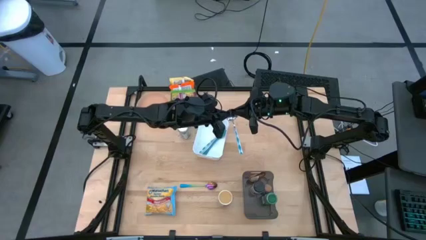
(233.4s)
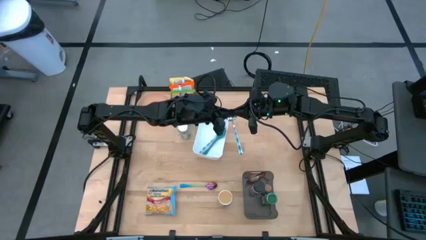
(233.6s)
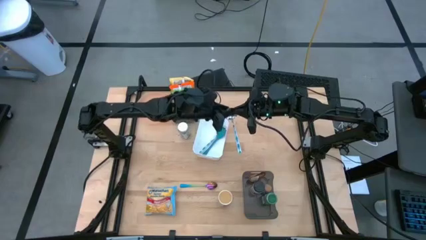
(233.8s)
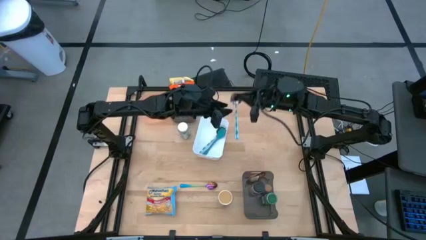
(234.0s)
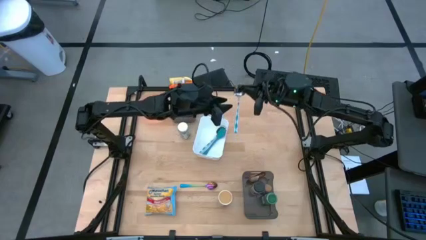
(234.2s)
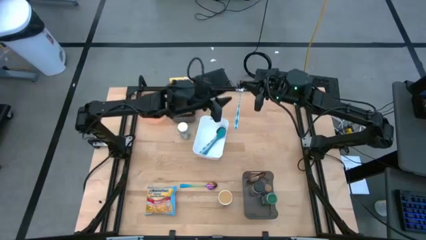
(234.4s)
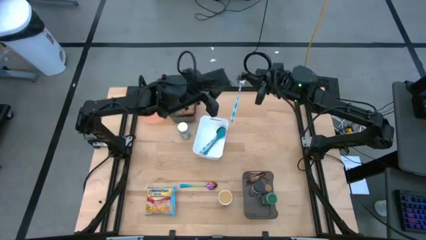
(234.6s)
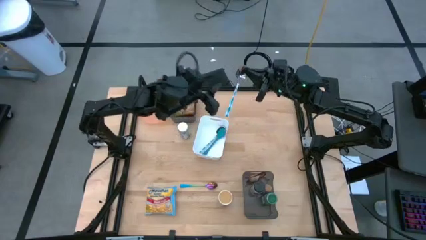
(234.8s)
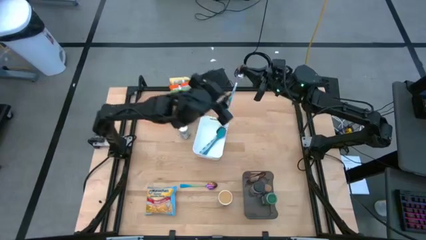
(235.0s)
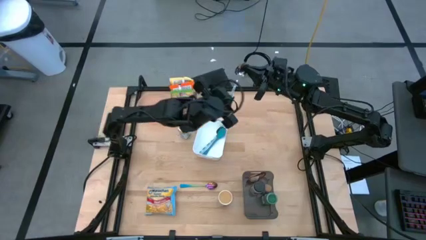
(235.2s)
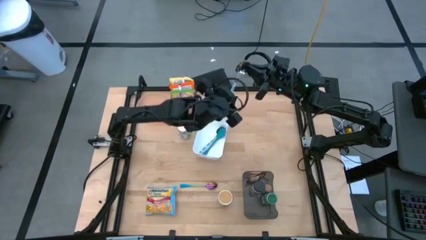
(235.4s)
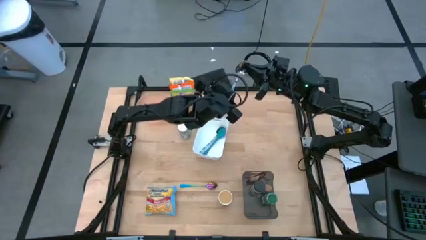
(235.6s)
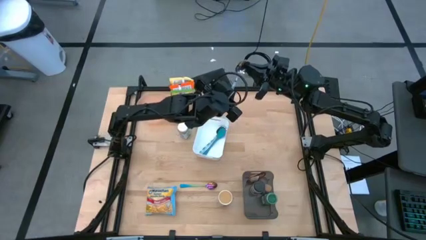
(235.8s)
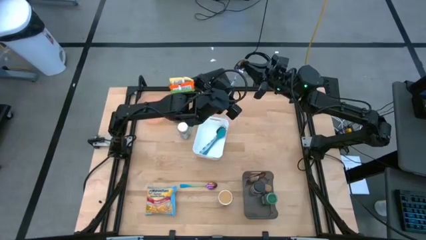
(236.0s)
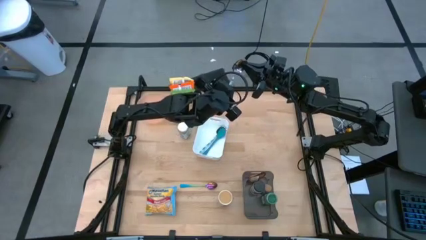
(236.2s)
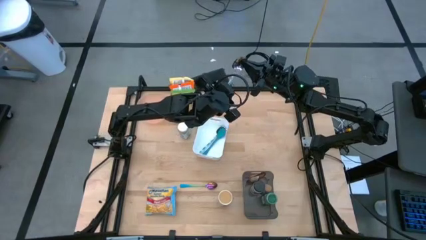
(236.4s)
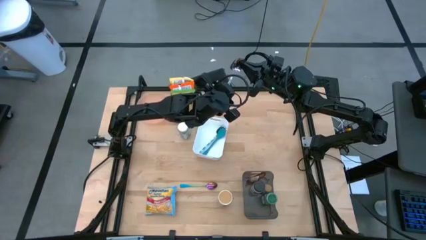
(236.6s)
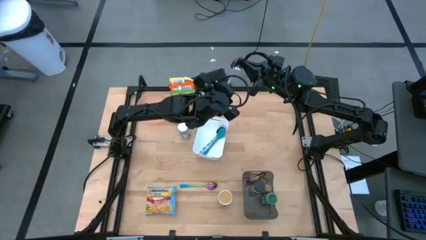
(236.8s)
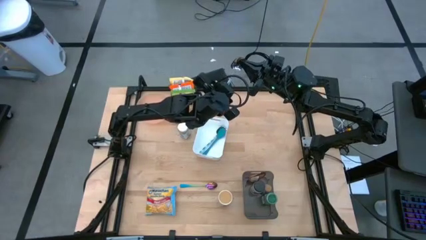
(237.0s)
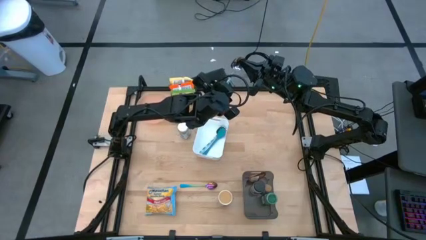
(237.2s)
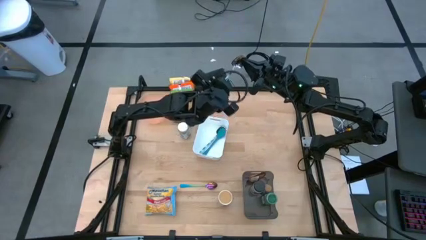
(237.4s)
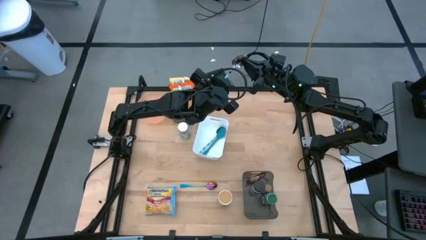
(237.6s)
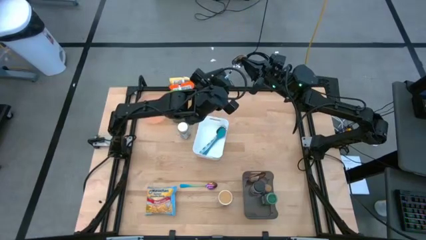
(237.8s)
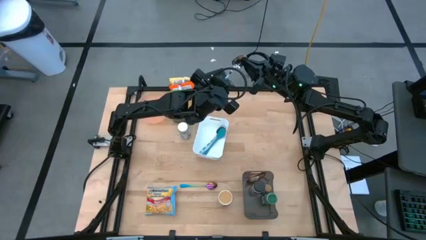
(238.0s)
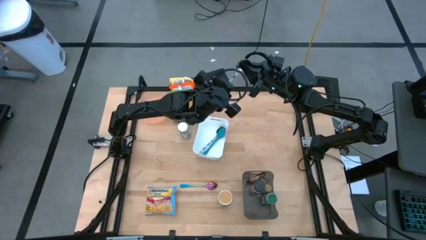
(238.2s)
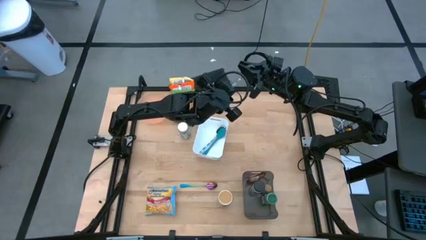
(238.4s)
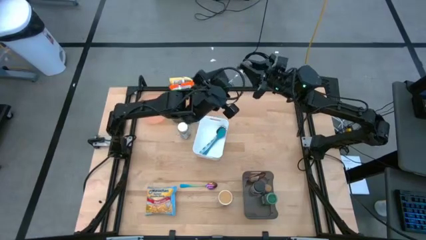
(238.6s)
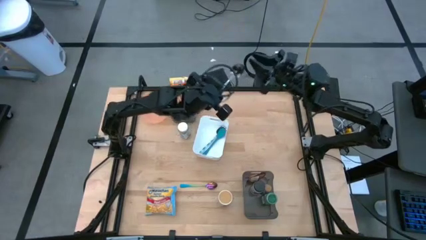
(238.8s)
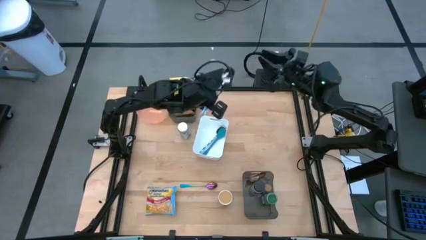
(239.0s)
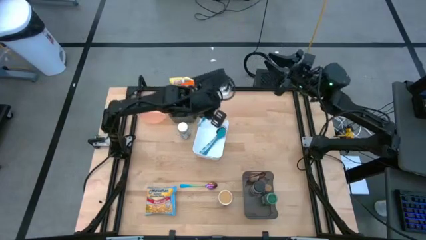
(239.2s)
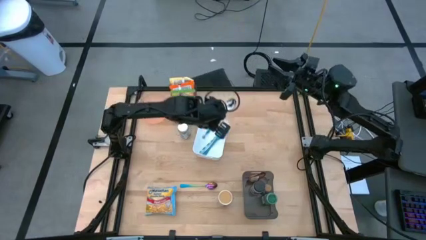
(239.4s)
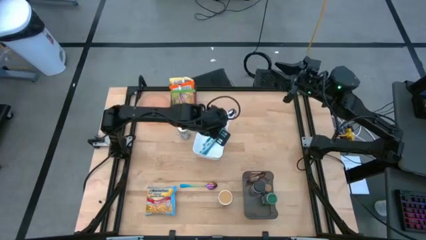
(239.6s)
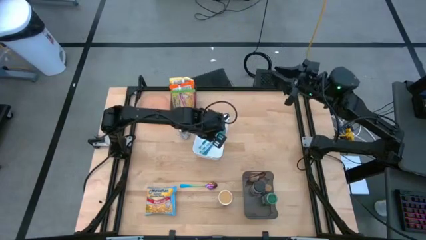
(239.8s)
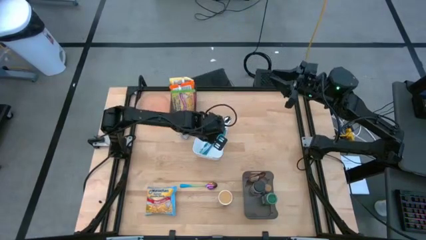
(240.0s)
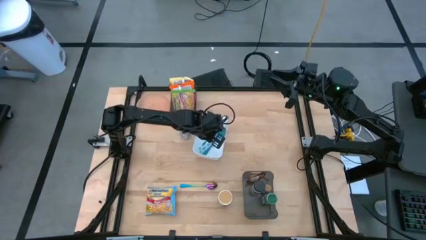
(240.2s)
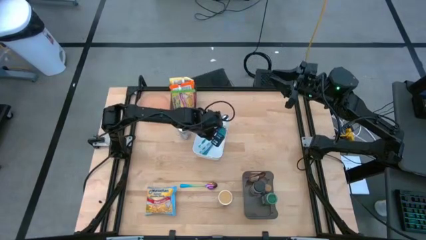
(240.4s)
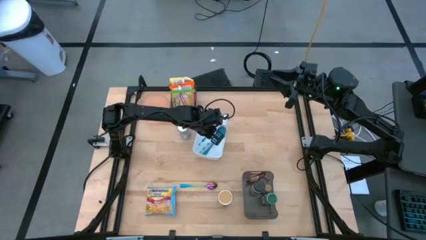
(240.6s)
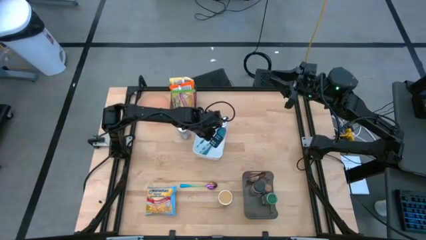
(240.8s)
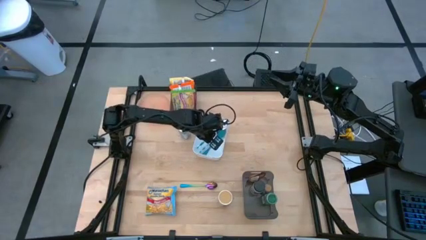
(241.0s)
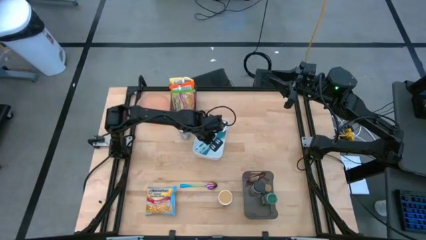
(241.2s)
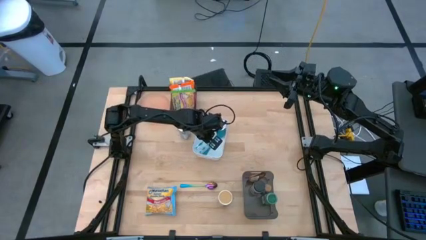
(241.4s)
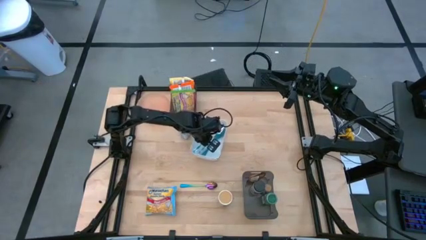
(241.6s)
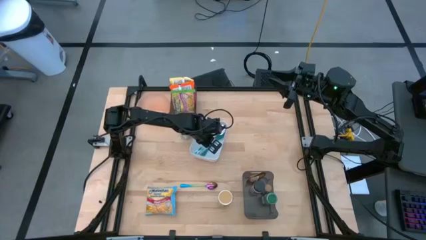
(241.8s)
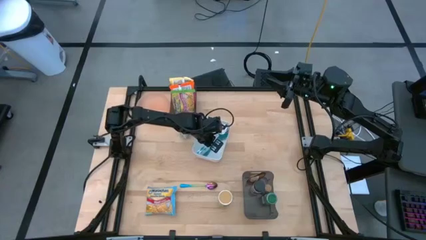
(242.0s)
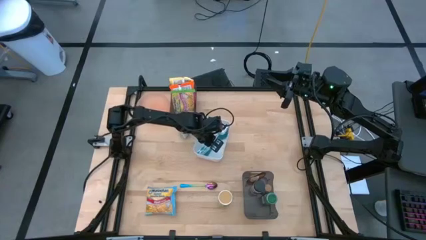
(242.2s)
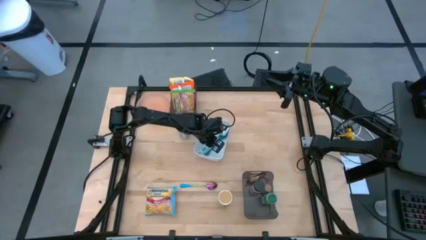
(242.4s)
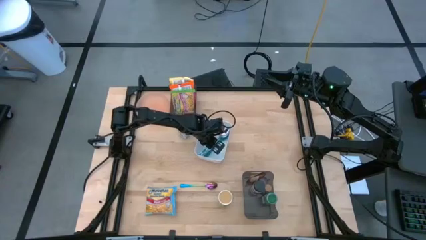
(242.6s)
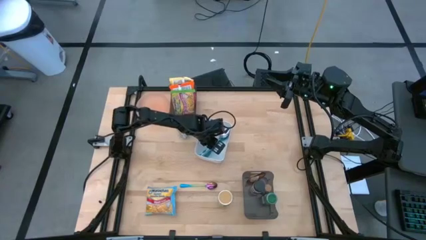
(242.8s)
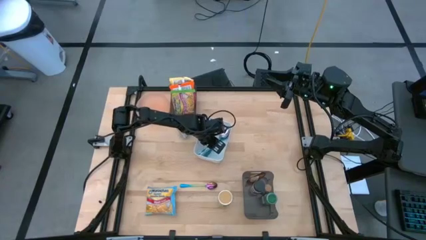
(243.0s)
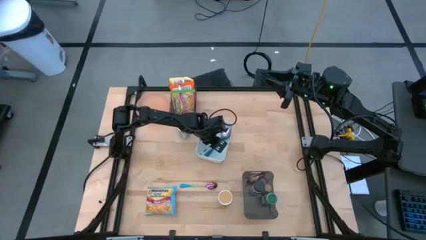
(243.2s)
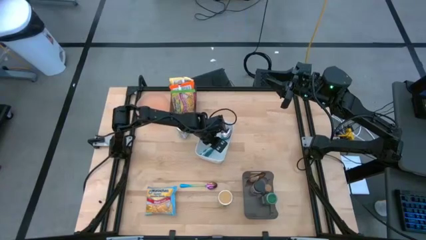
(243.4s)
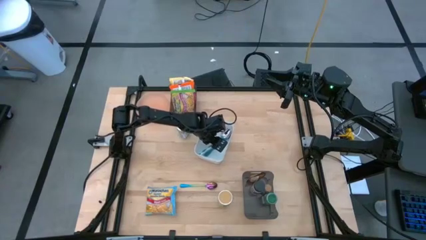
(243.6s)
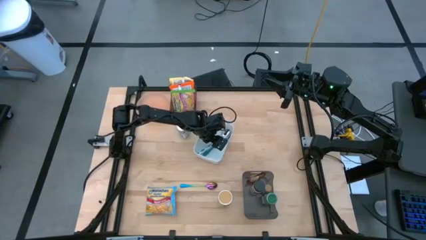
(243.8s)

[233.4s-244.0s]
Task: Pick & Place Food Item
Put the white patterned spoon into the white bin

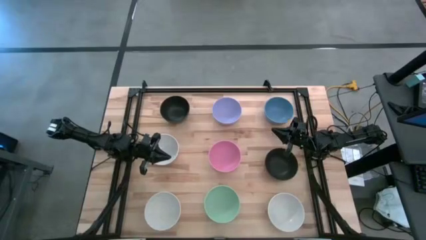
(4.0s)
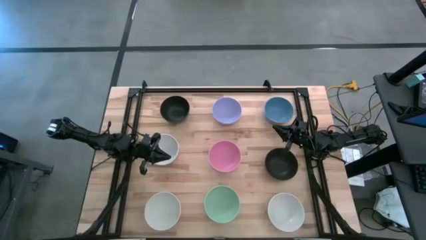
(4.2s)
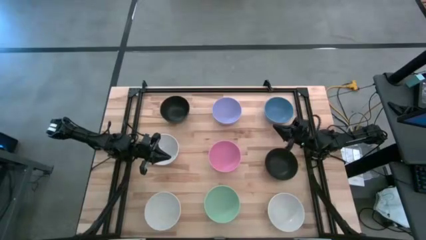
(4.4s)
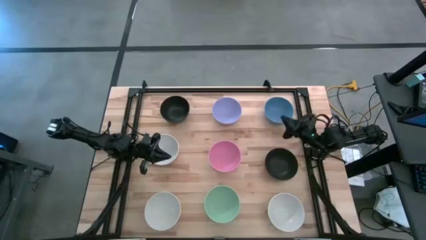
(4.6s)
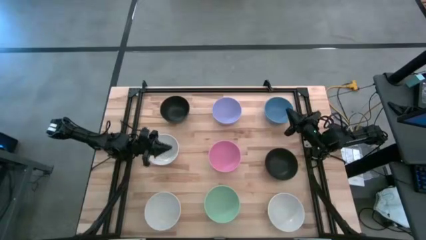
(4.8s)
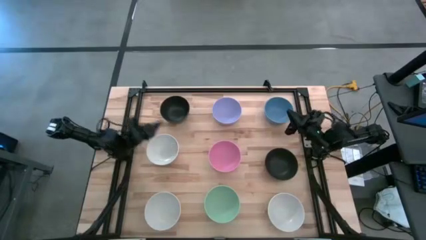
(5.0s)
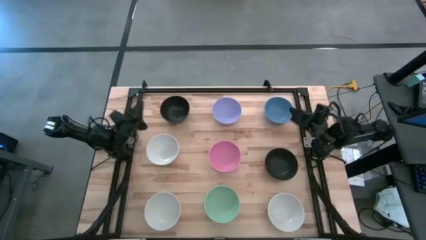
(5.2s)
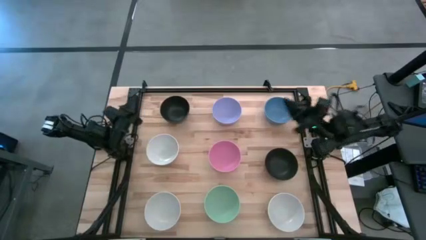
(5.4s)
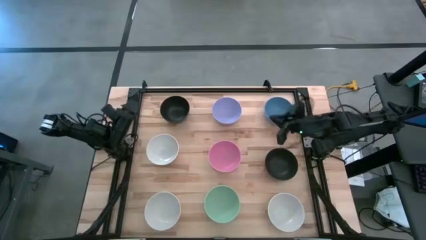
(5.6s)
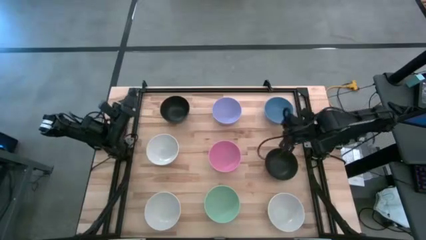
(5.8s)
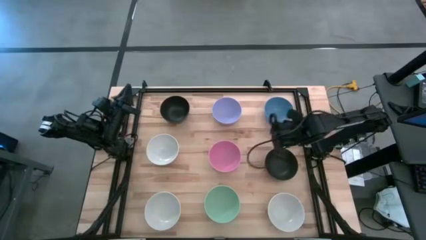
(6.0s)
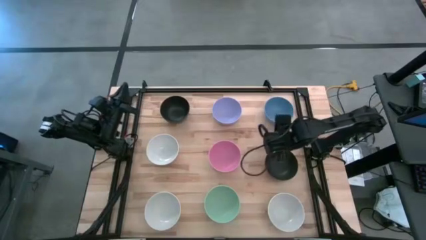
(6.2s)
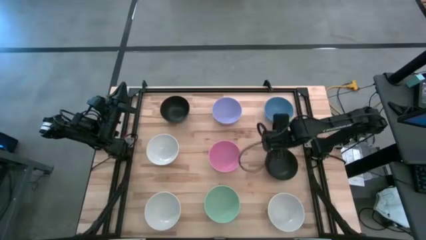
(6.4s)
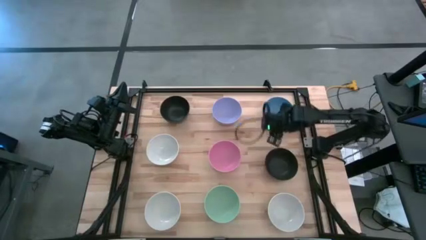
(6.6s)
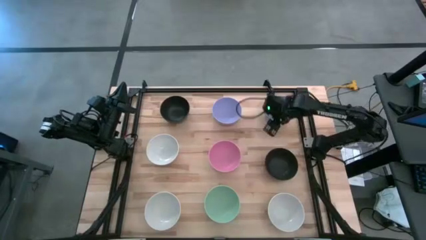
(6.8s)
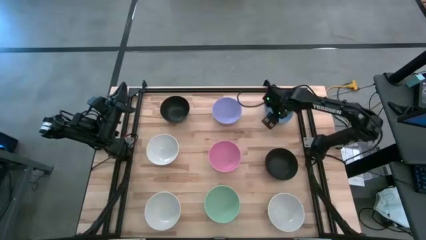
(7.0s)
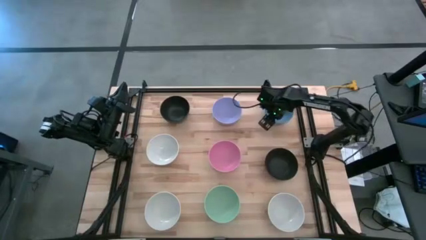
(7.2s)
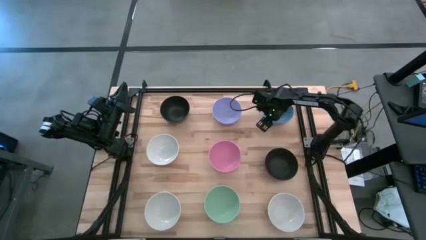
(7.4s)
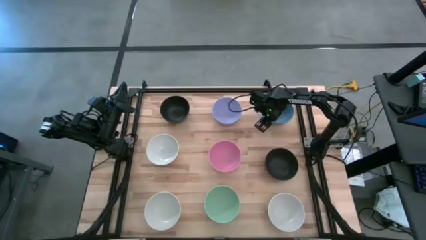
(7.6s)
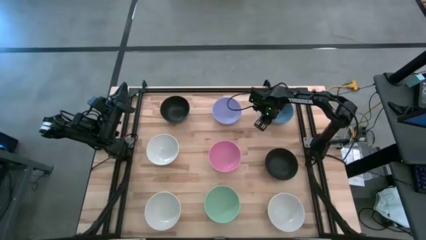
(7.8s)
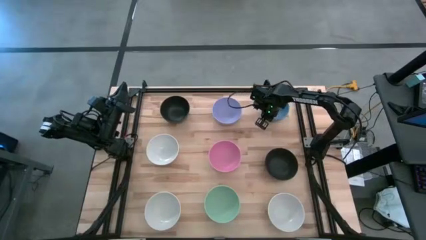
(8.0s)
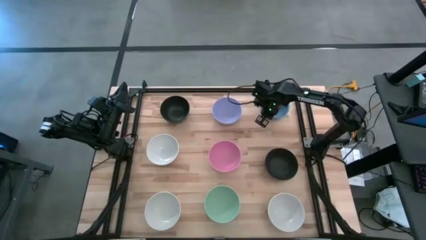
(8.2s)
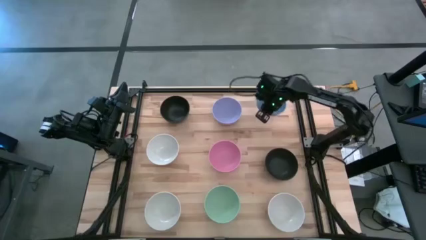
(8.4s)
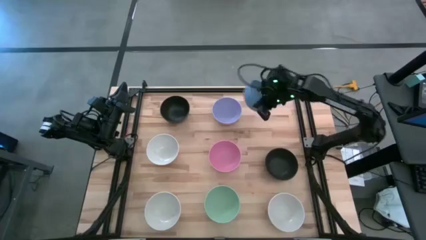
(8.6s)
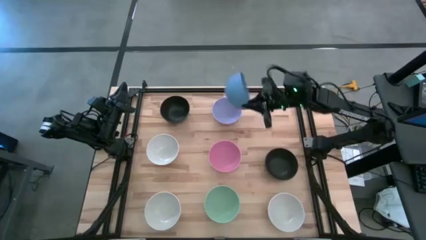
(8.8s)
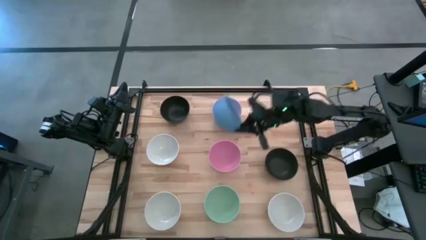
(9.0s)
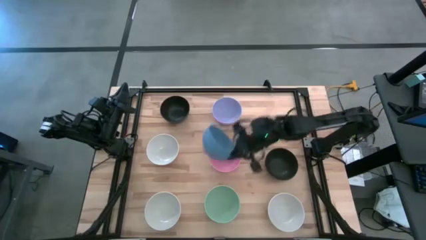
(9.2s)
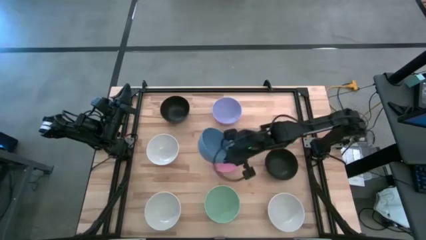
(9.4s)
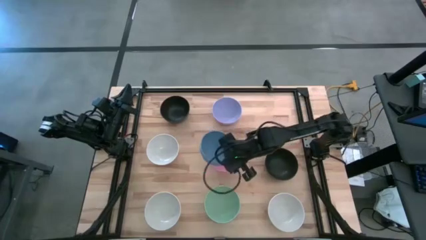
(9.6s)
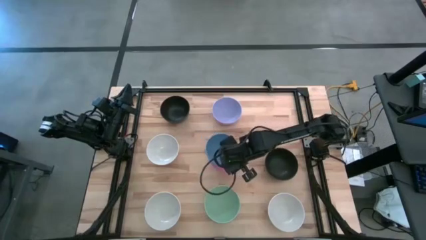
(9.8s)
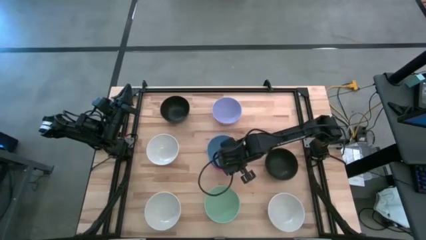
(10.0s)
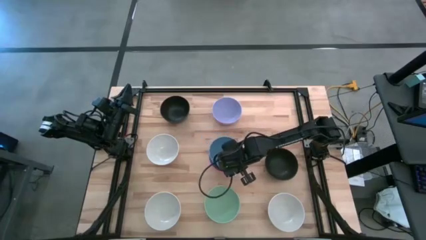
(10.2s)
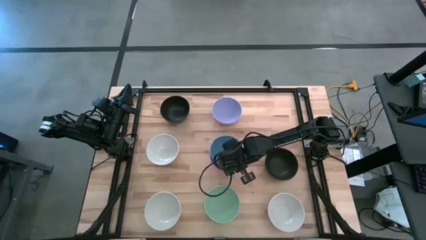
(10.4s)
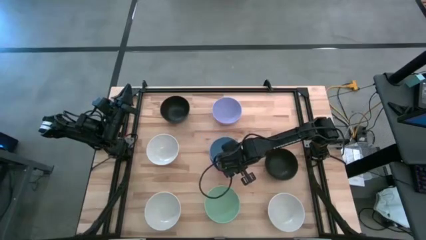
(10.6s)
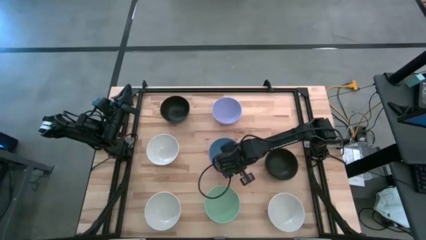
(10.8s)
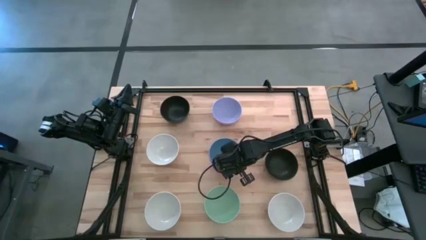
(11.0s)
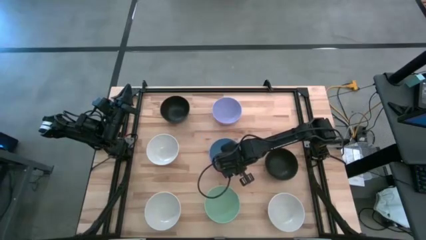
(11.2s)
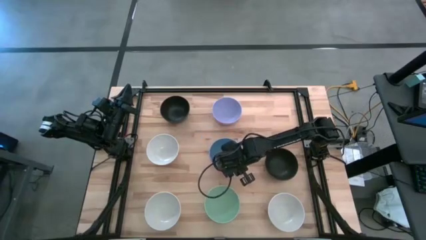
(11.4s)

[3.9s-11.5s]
Task: Nest bowls inside each other
Stack the blue bowl into the pink bowl
